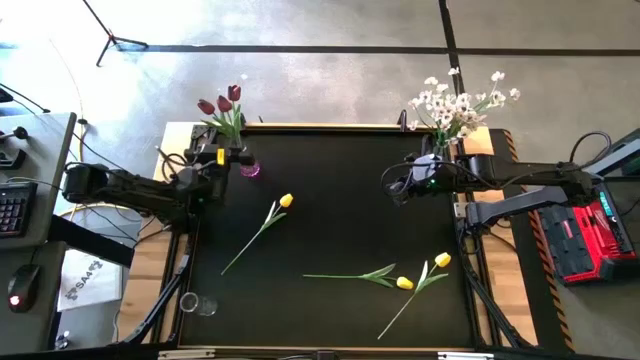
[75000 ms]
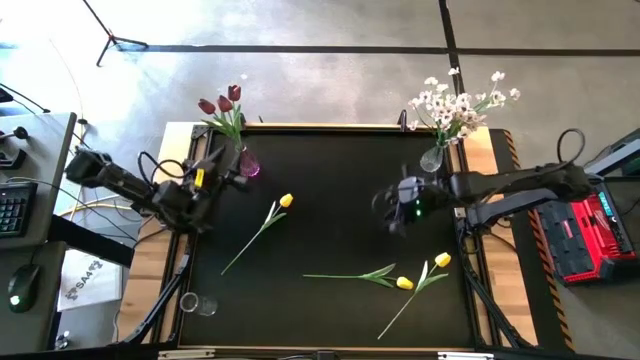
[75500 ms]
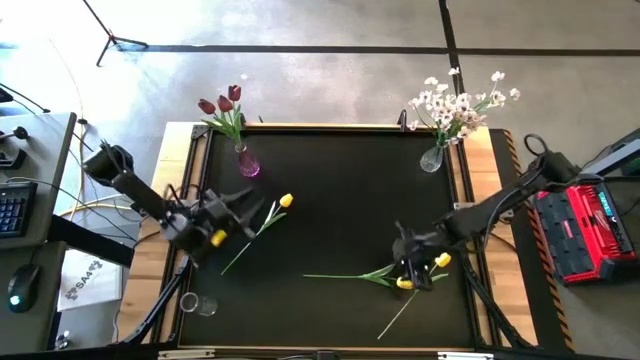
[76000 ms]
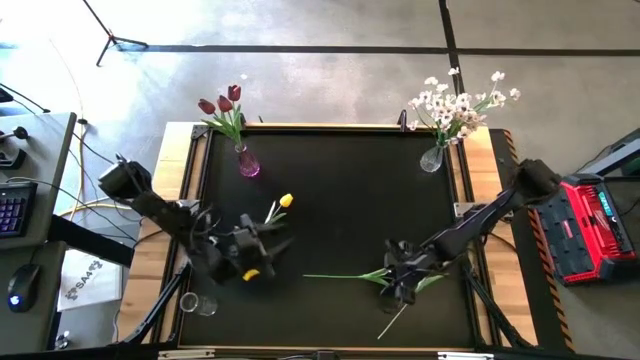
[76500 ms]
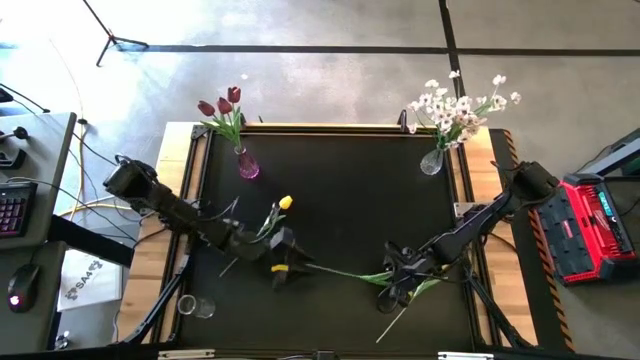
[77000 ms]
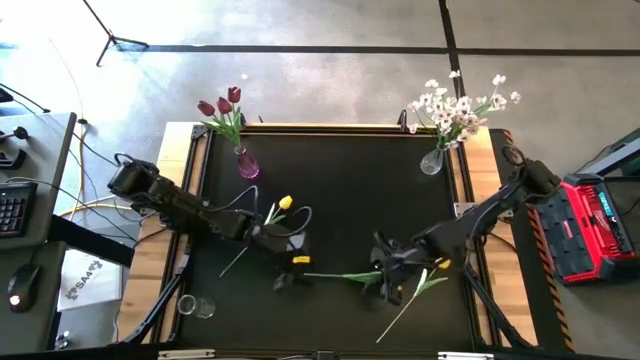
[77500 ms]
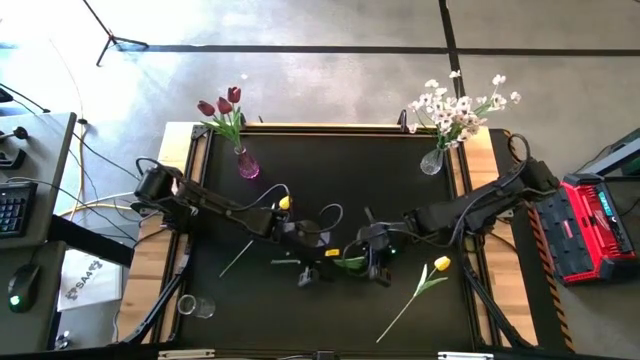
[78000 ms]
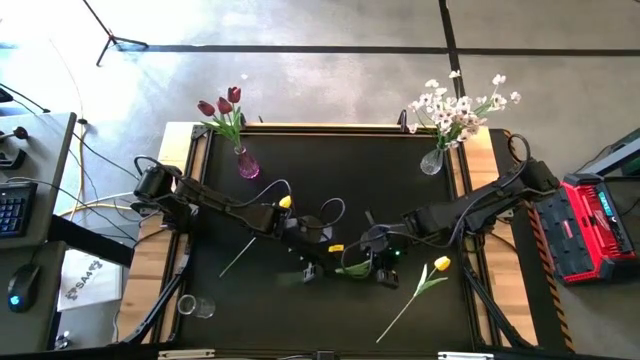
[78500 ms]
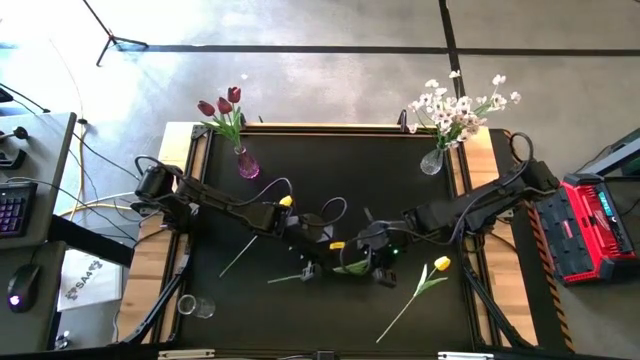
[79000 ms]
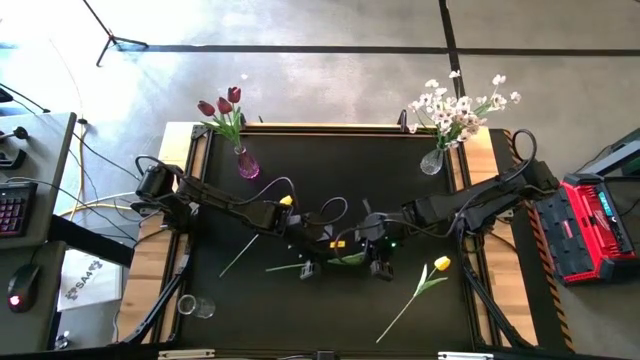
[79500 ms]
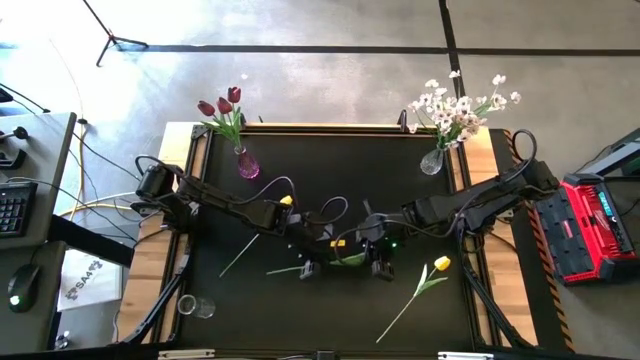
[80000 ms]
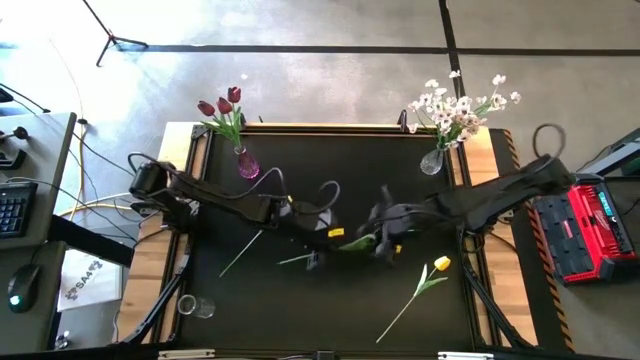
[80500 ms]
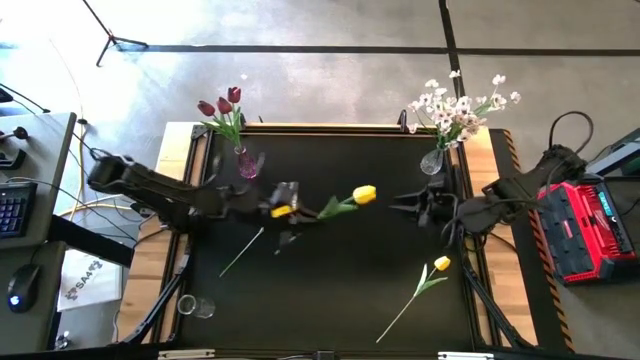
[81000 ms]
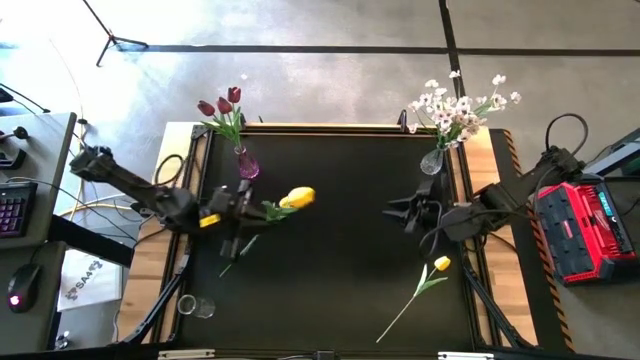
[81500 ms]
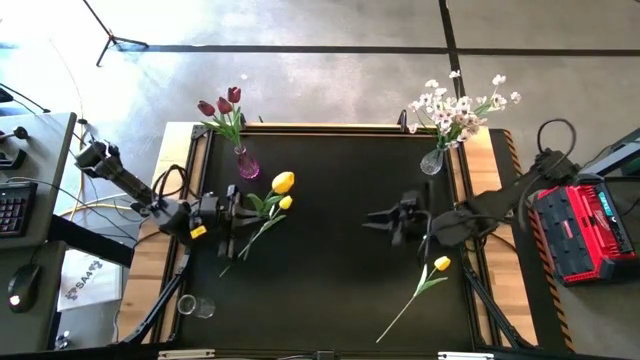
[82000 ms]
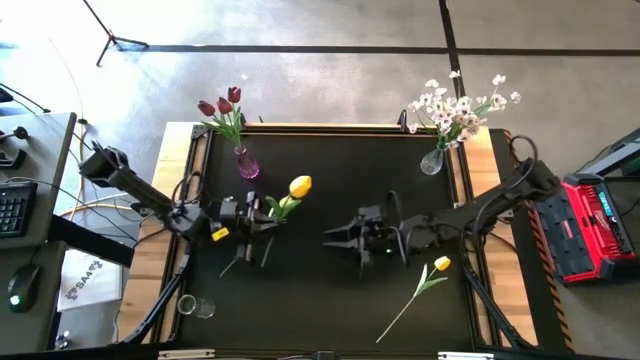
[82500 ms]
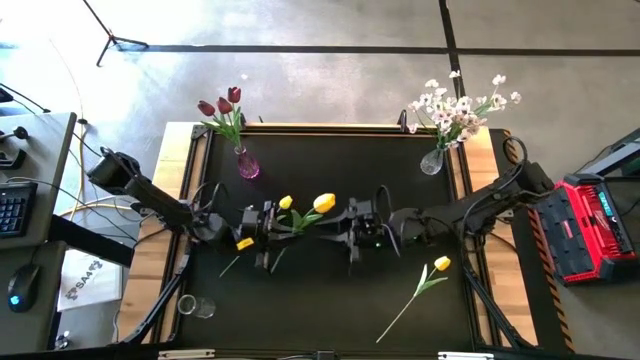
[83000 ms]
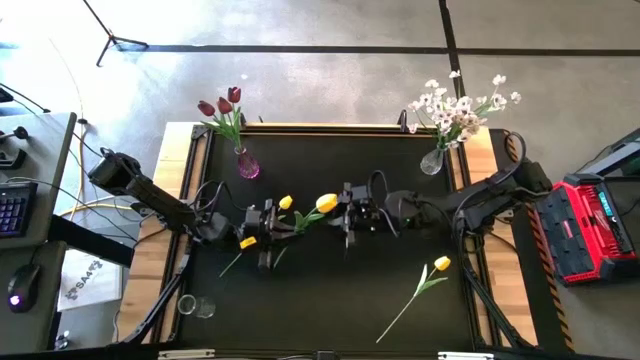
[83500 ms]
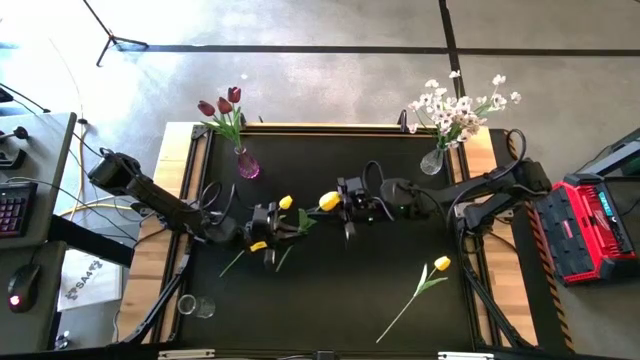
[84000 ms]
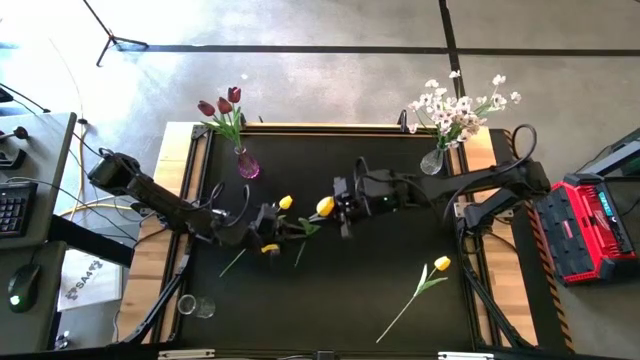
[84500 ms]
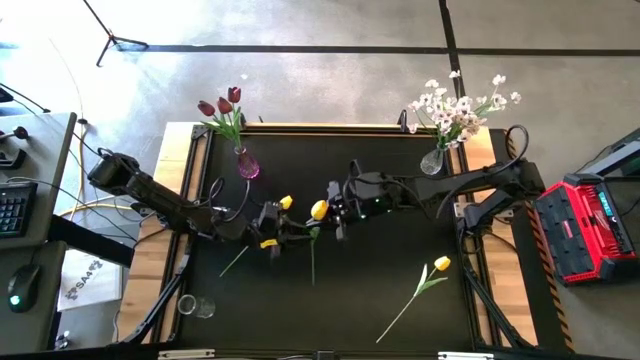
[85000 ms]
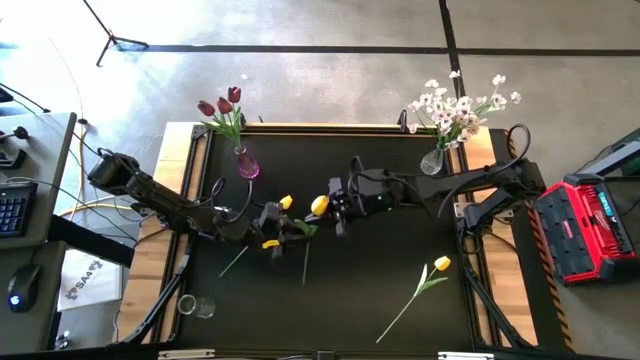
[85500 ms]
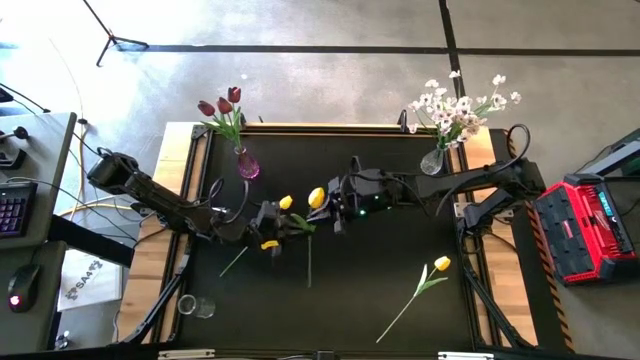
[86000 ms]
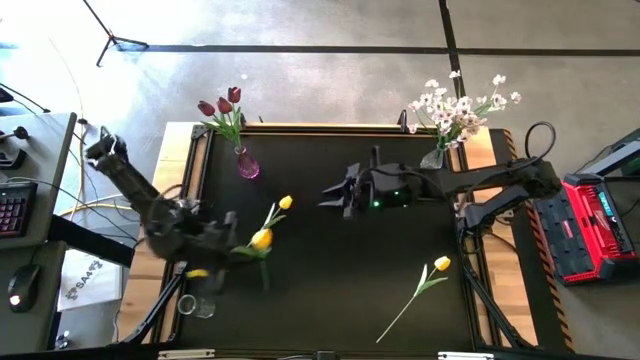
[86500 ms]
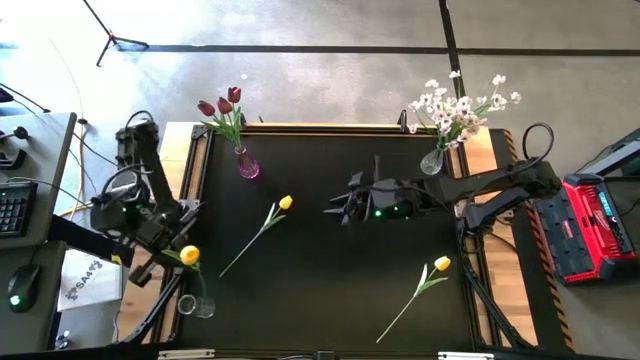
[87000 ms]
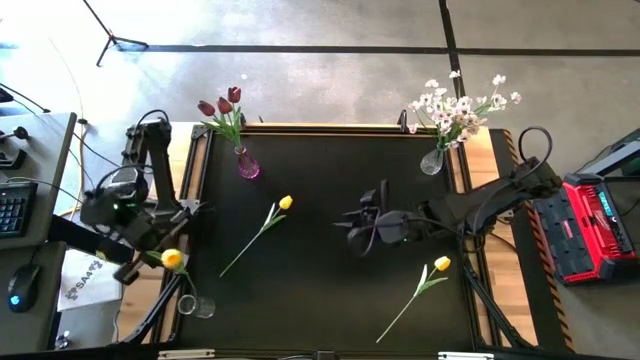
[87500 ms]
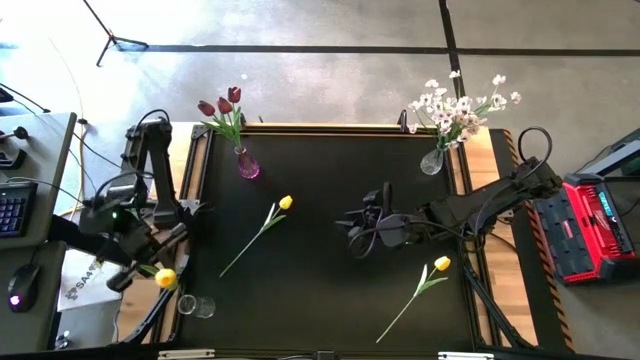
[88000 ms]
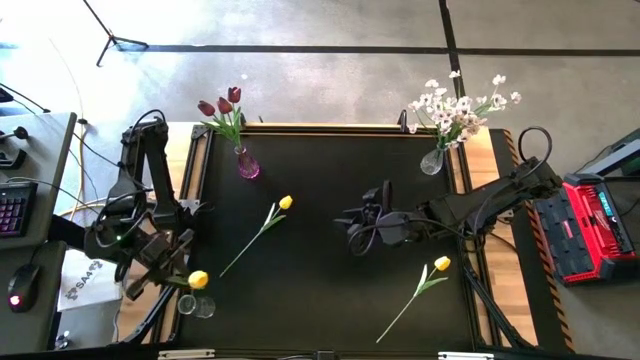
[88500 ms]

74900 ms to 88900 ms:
Task: Sort flowers into vase by color
Put the middle yellow tulip flower into the bottom left transparent vase

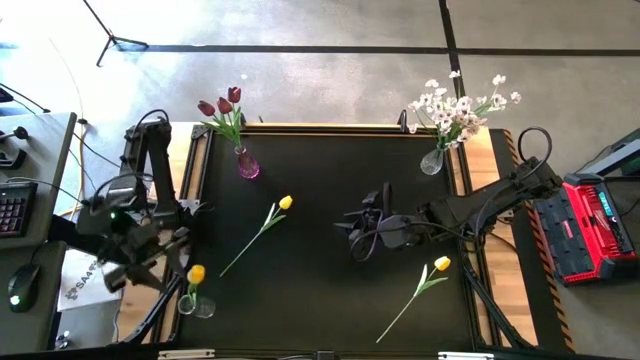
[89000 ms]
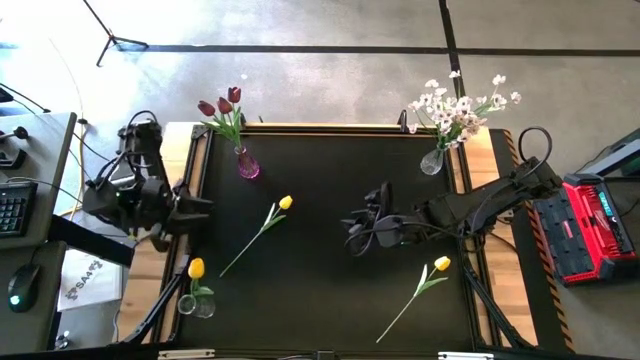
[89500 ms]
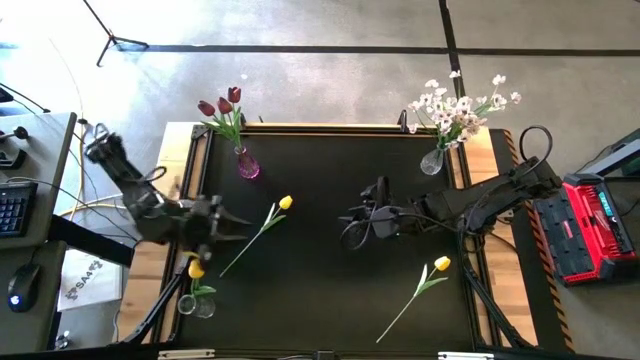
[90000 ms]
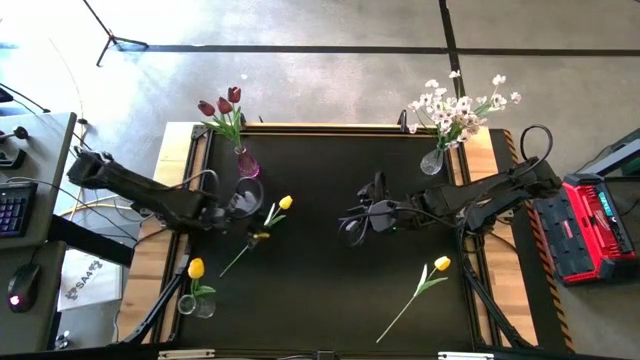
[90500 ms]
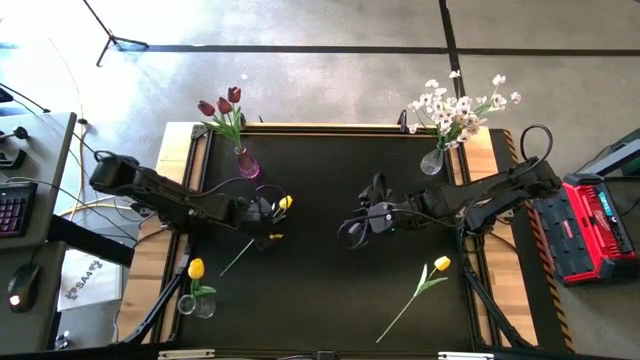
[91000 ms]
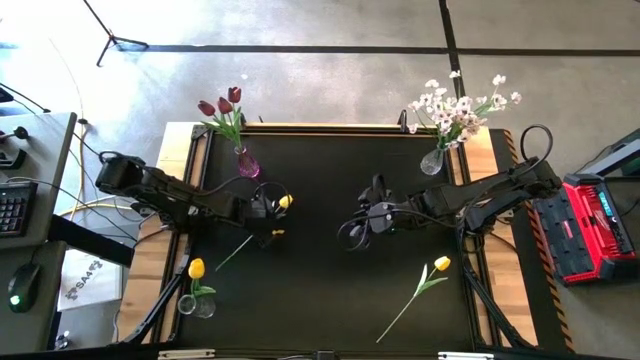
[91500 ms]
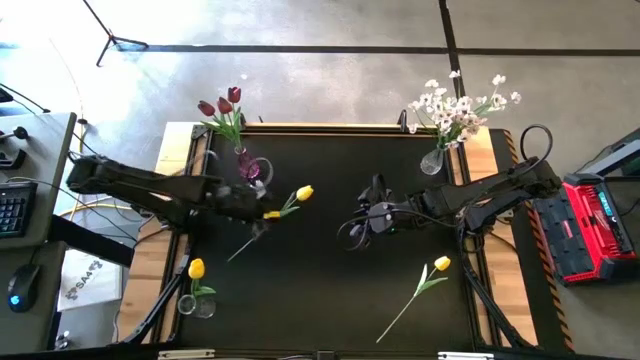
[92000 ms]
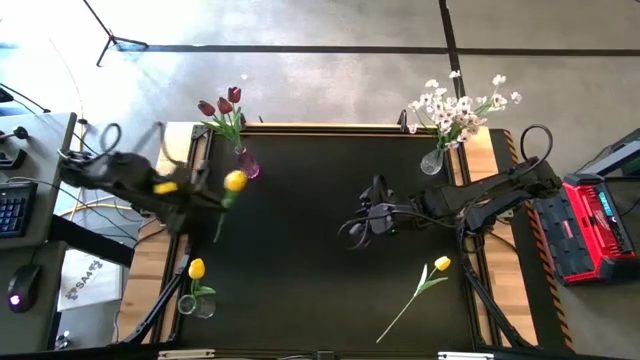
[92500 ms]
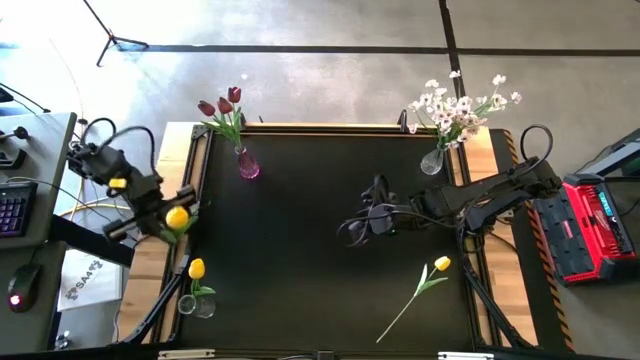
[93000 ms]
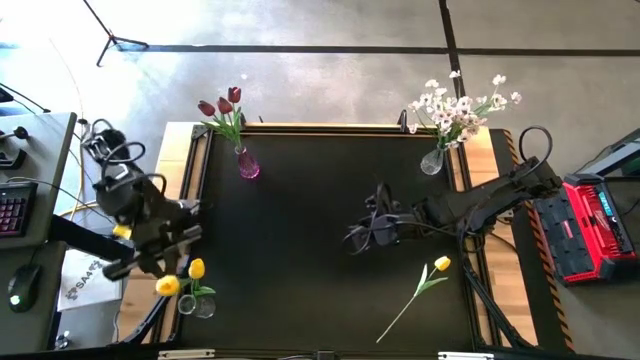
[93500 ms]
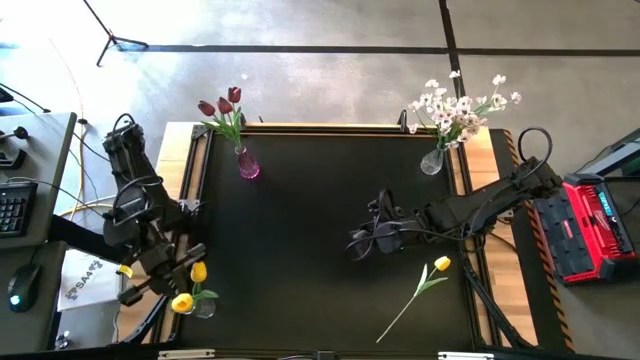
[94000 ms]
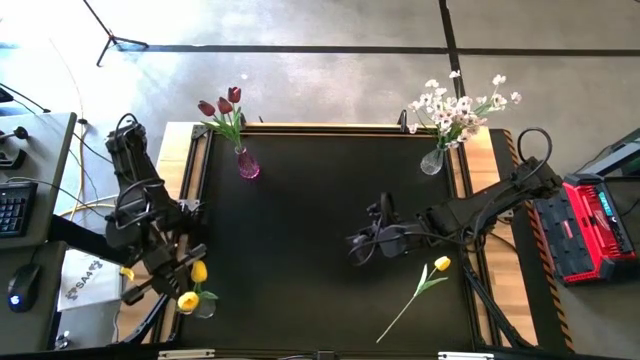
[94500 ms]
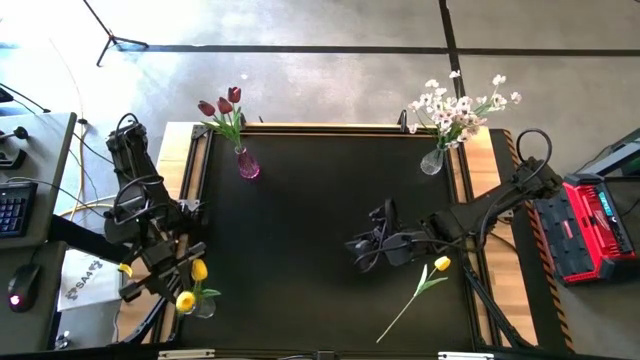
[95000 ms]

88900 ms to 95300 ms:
Put the left yellow tulip flower into the bottom left transparent vase

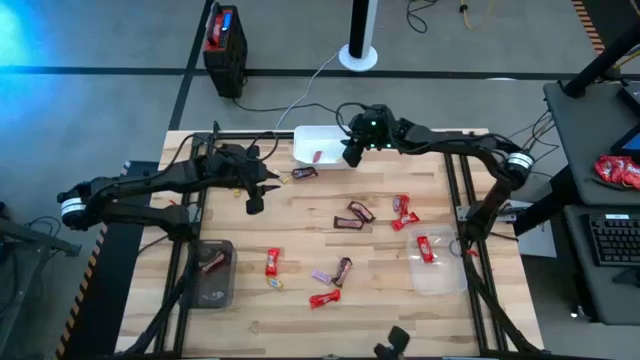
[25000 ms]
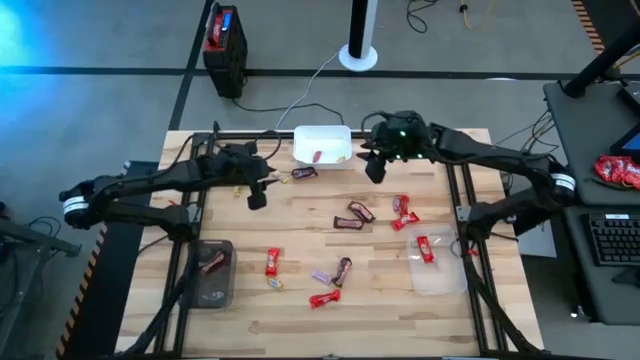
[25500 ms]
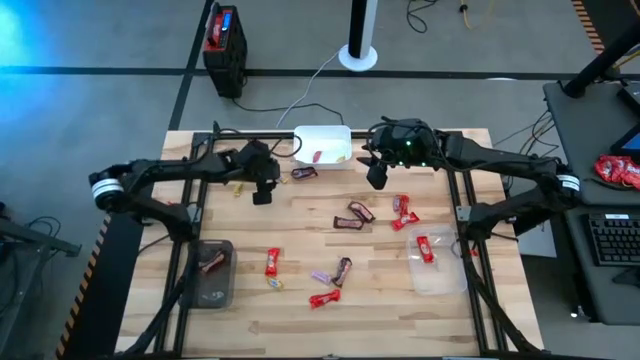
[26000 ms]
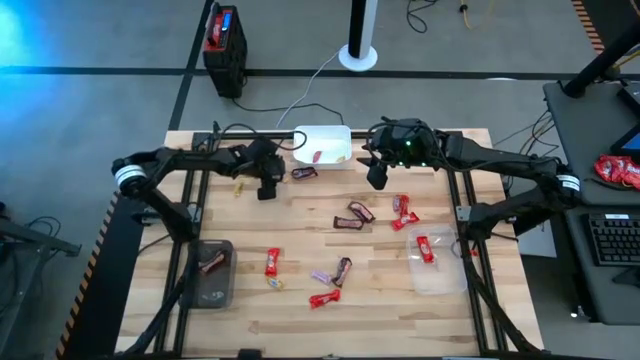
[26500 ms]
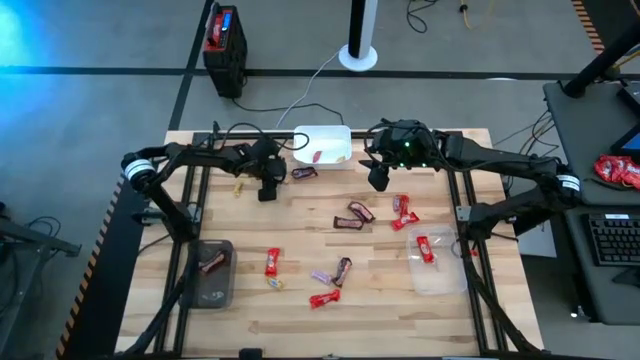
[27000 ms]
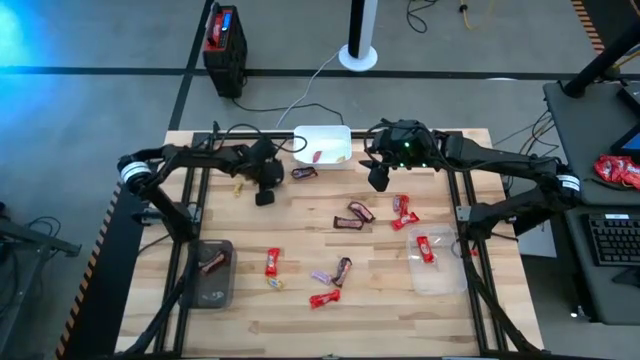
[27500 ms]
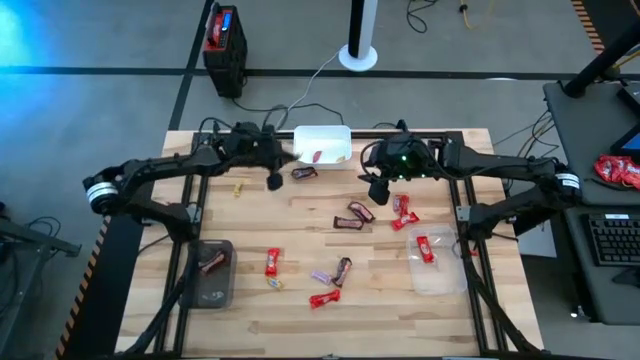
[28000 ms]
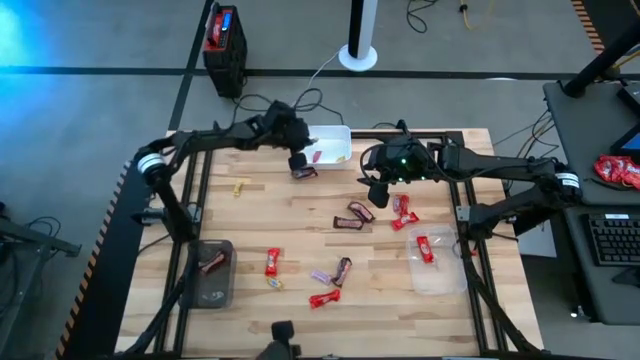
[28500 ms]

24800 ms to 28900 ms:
Task: Sort candy by brand, put in halloween buckets
Put the yellow candy into the white bin
